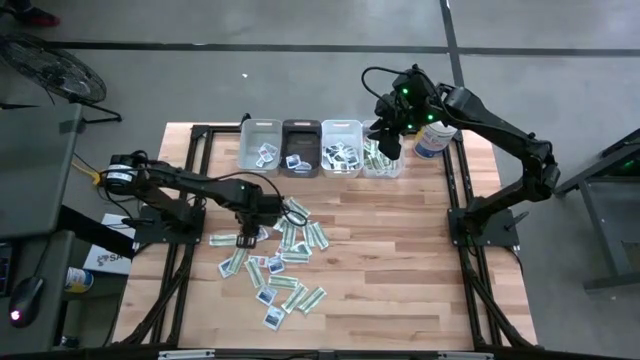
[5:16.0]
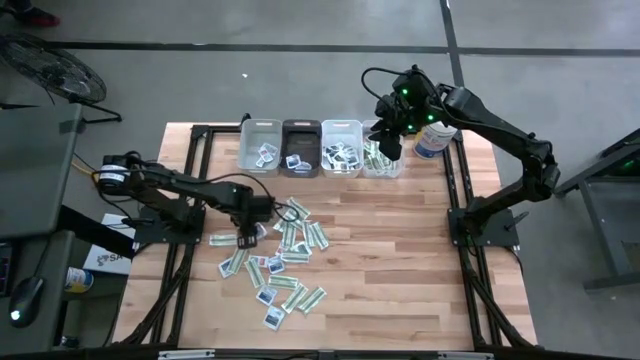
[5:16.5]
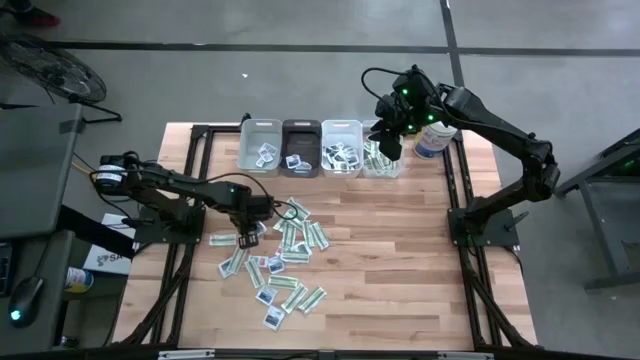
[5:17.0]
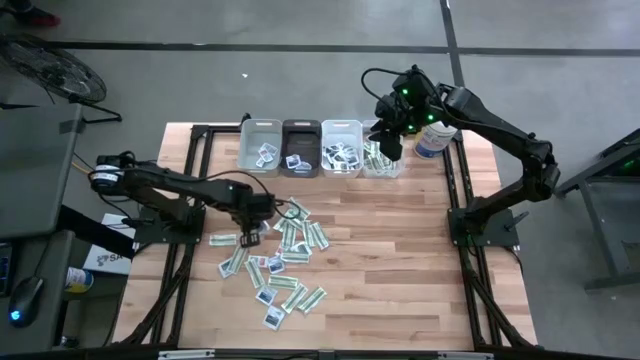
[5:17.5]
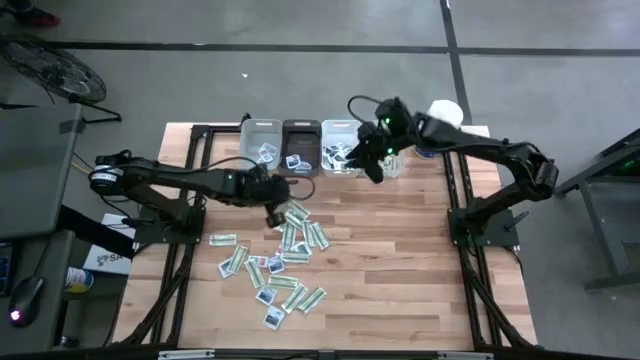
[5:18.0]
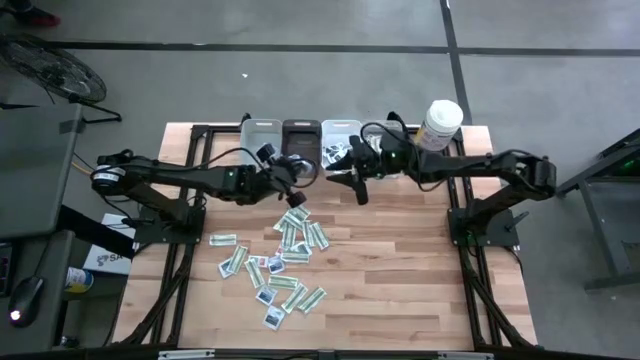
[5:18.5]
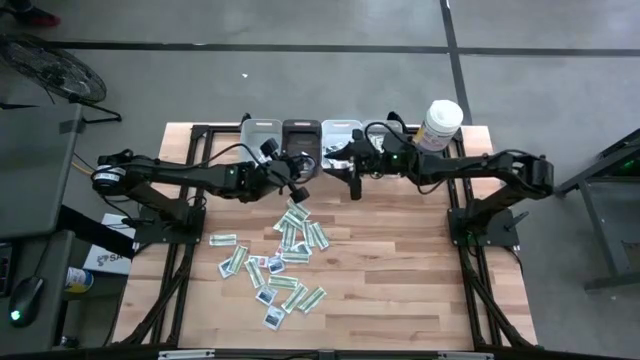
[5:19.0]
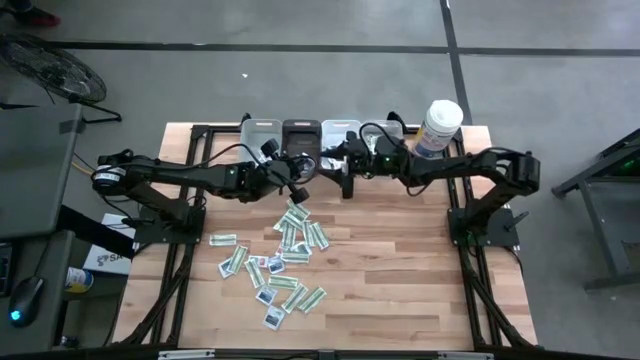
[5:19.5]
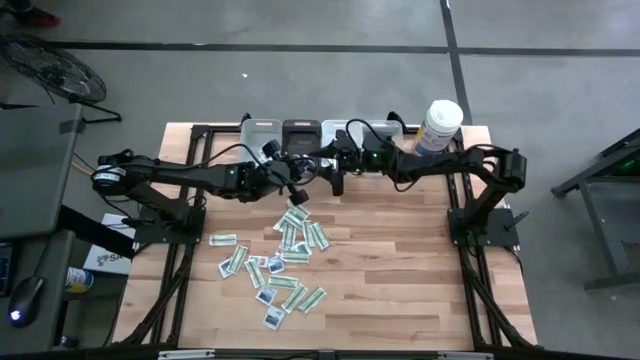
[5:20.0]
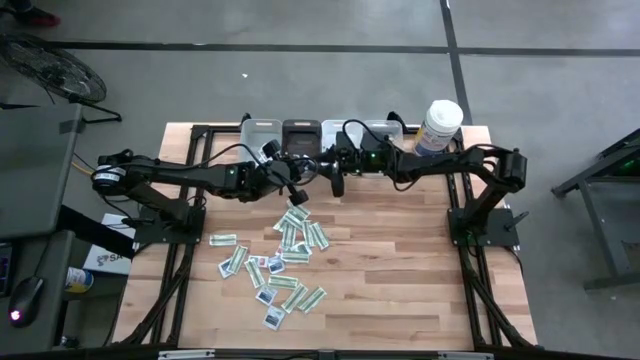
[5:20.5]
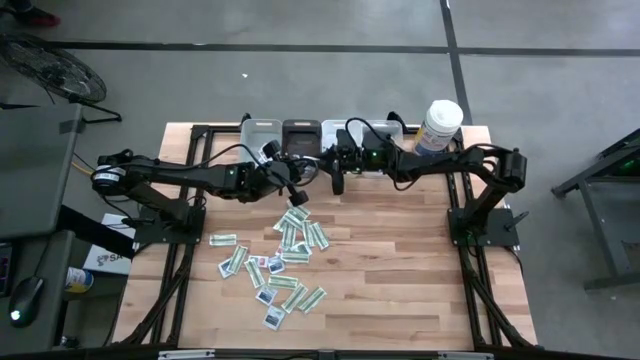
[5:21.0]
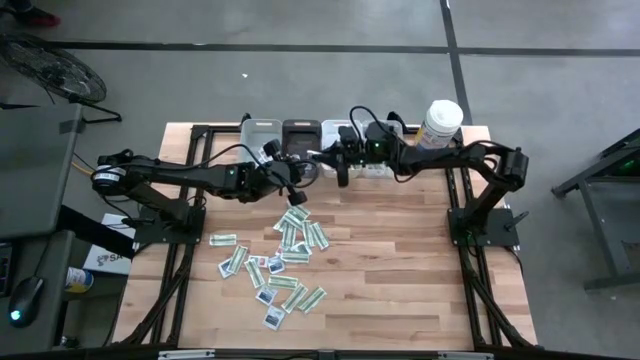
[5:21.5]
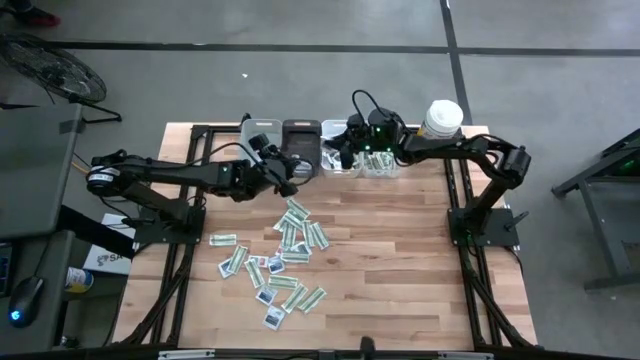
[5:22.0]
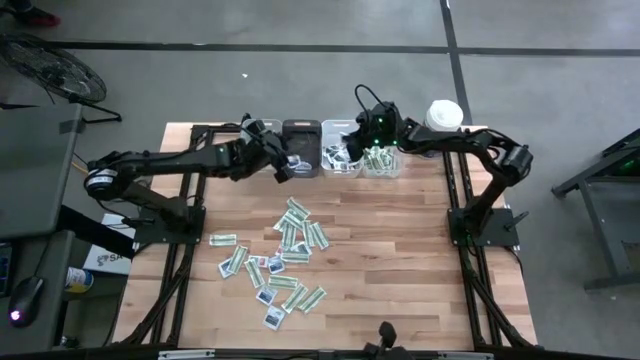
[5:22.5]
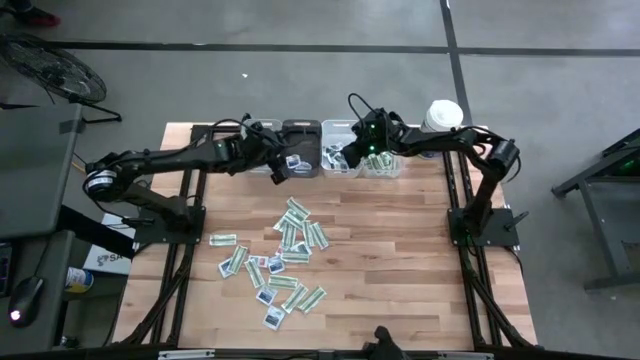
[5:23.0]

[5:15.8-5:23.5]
Task: Pick & Place First Aid Supplies
Put the black towelette pack into the white bin

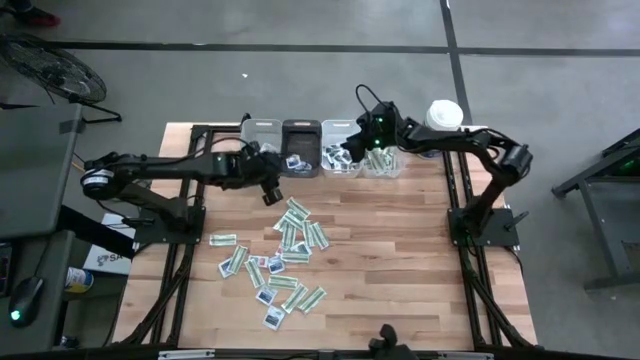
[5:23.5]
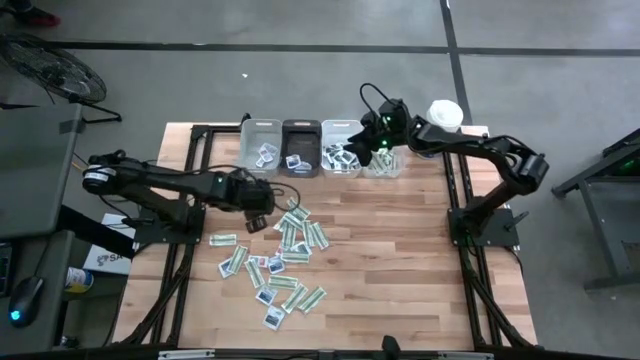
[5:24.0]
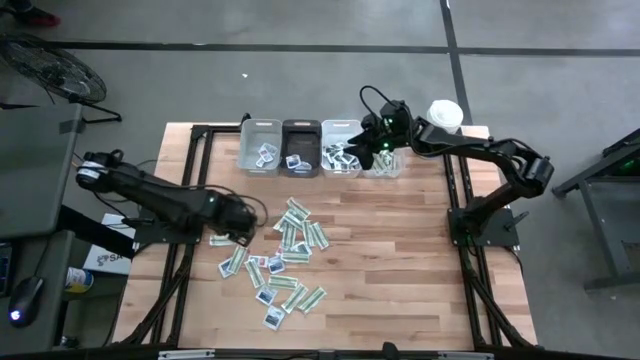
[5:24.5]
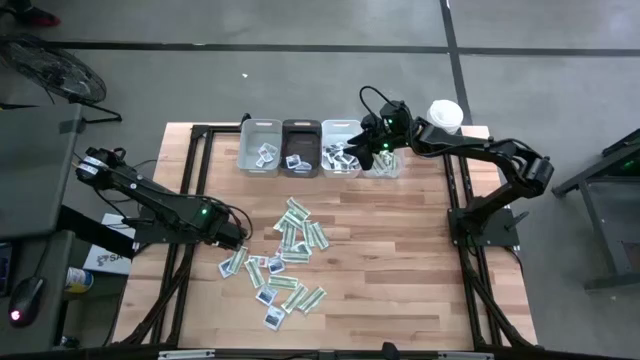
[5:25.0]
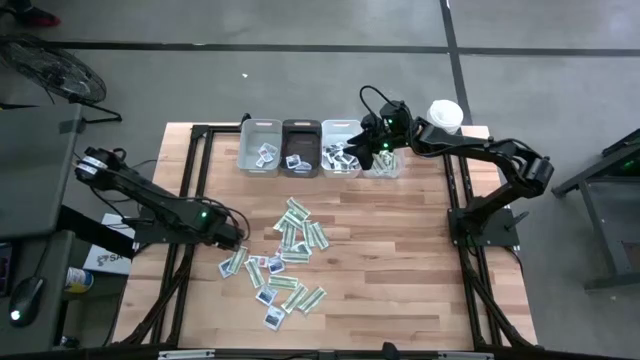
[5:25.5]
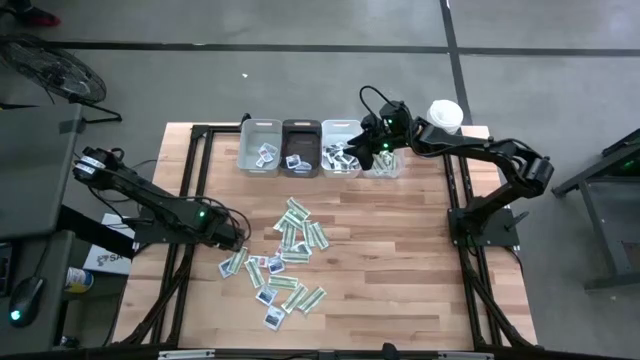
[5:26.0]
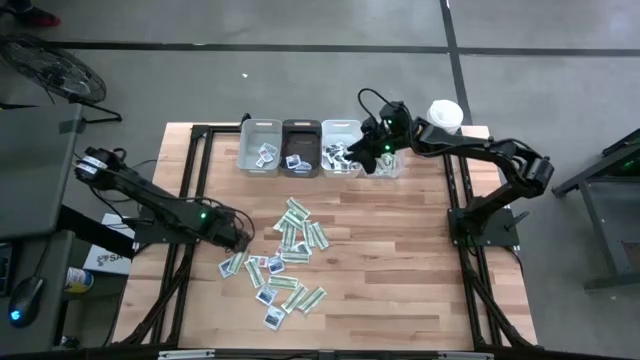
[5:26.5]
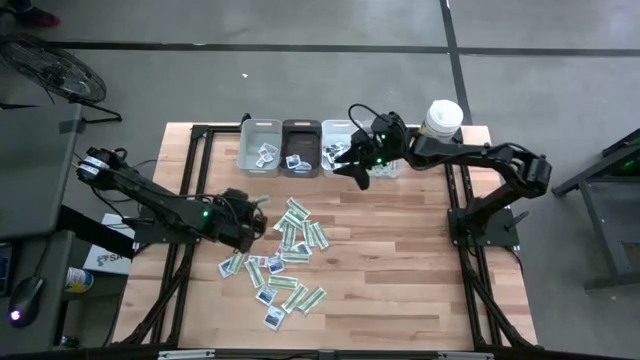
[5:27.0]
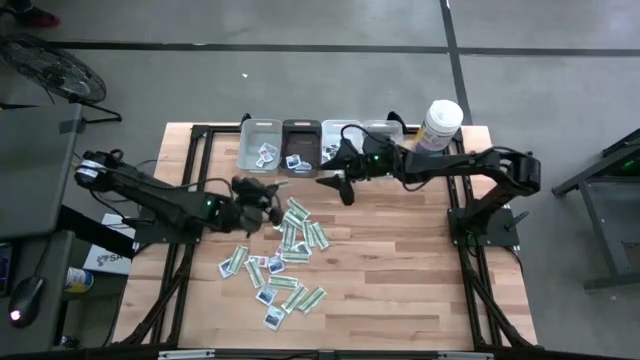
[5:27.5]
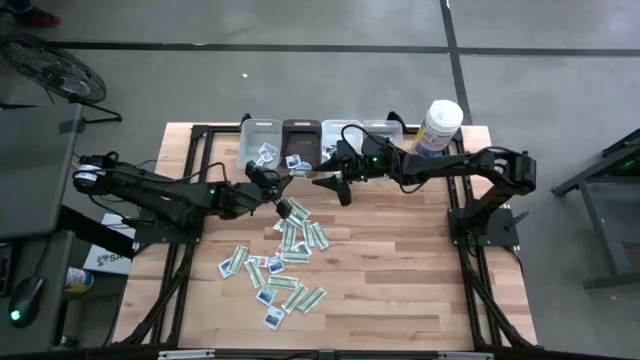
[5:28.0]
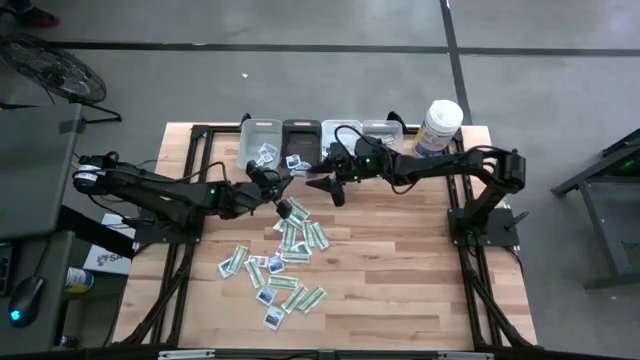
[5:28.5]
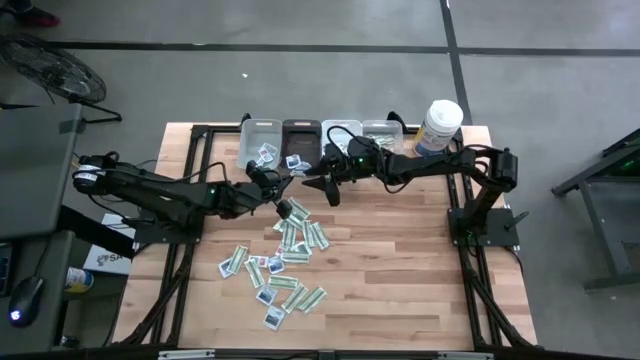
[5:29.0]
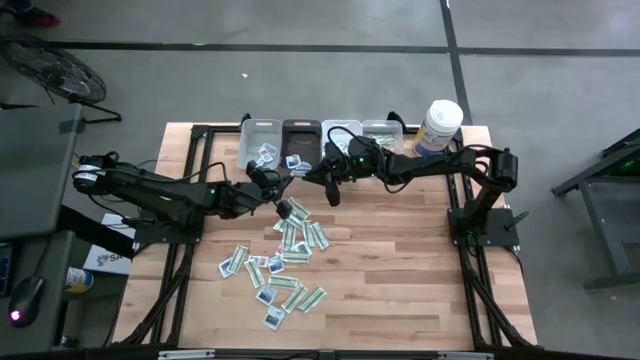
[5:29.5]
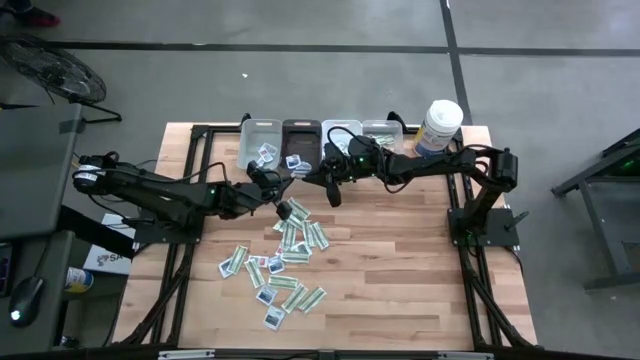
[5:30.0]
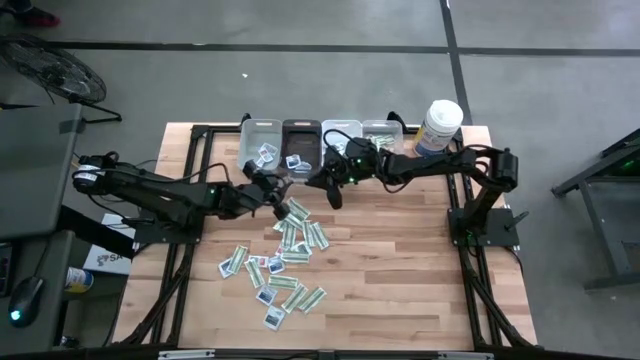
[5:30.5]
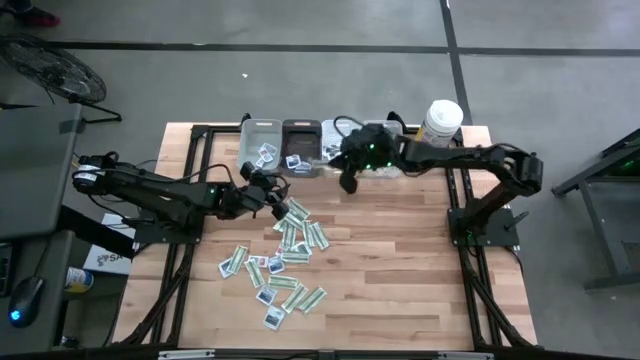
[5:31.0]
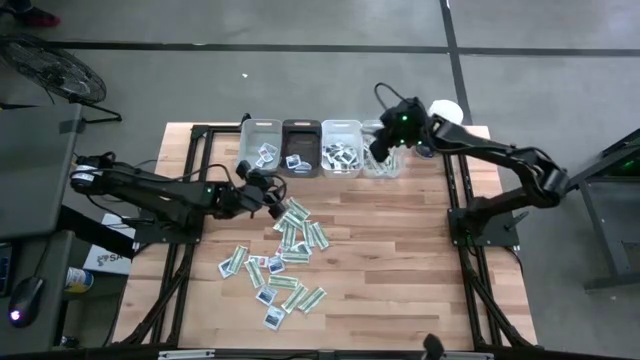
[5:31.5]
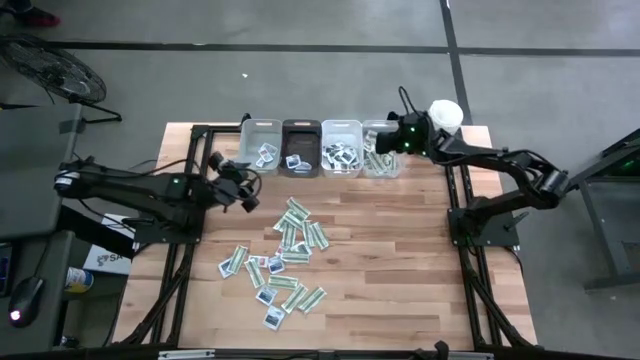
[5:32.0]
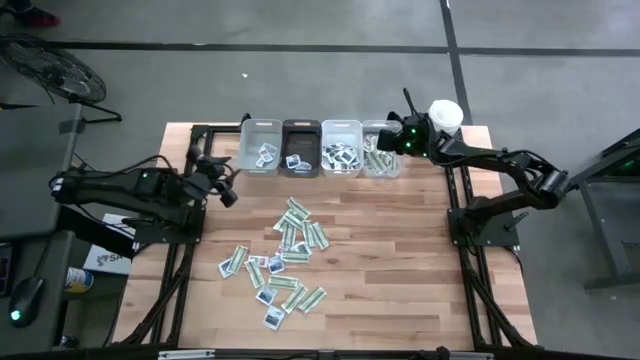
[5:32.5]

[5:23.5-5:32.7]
Put the green bandage into the transparent bin

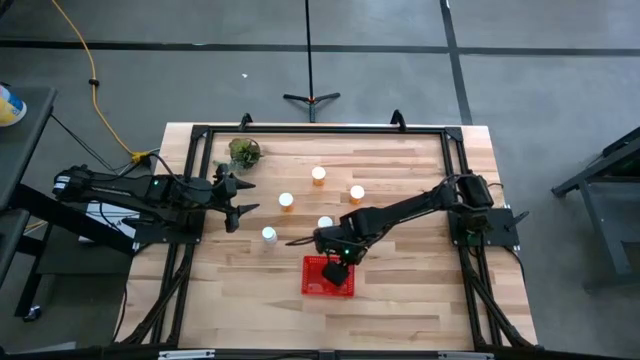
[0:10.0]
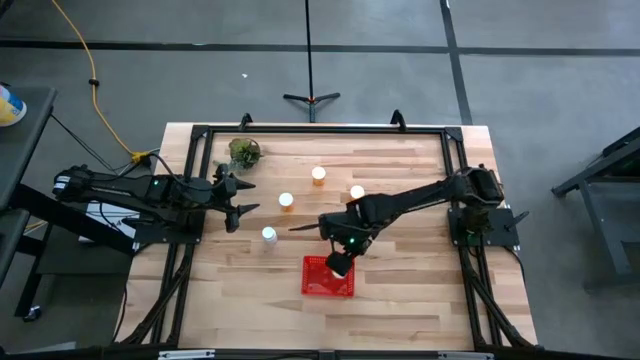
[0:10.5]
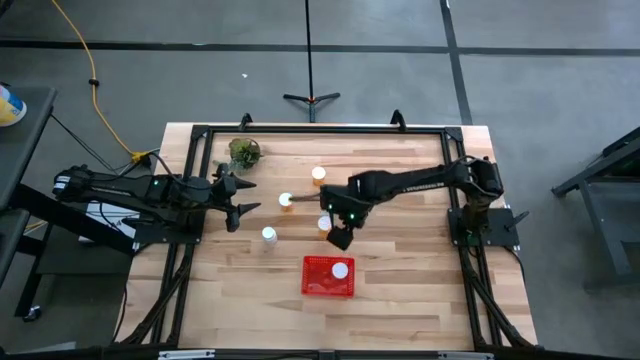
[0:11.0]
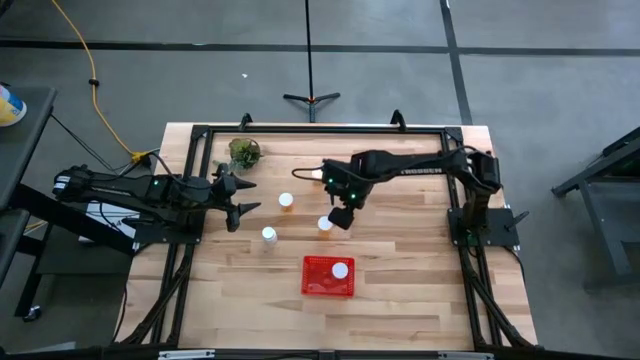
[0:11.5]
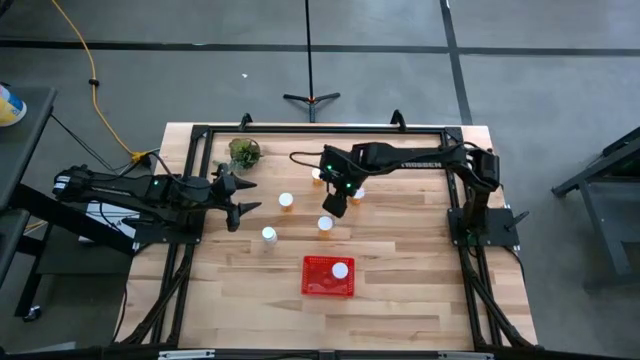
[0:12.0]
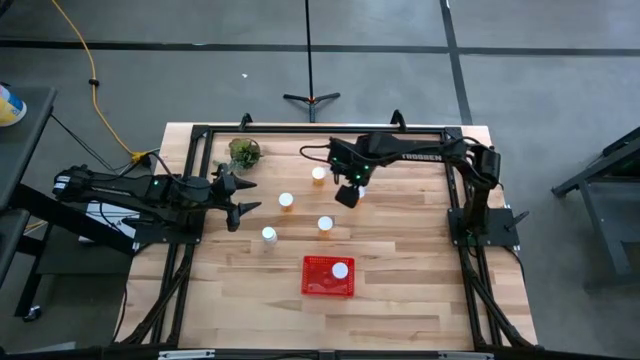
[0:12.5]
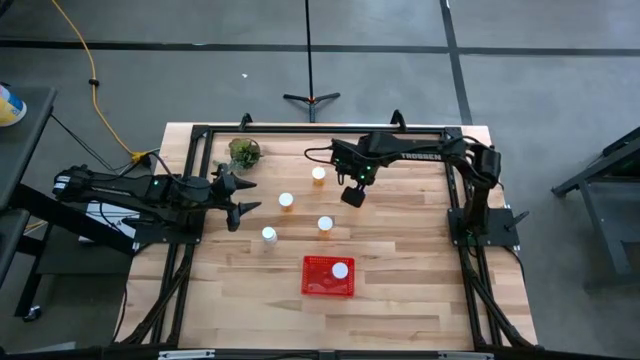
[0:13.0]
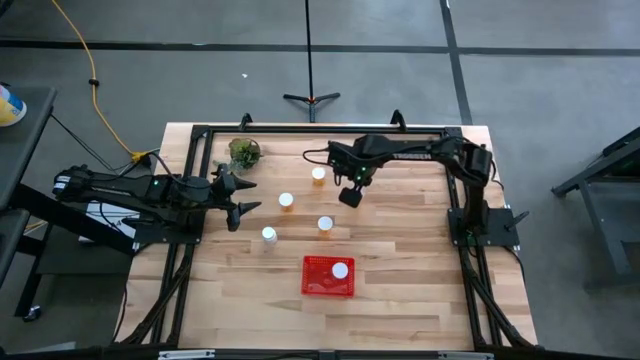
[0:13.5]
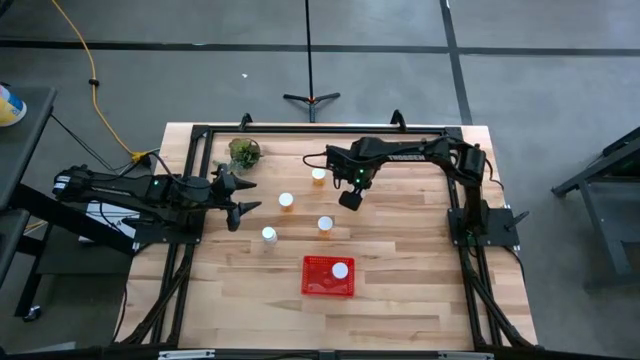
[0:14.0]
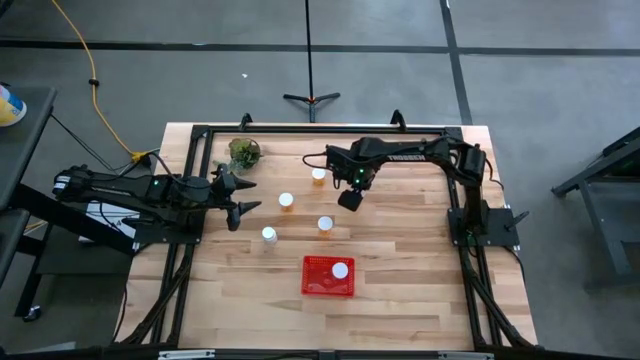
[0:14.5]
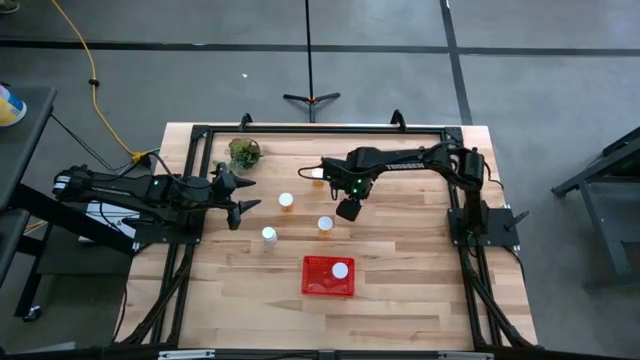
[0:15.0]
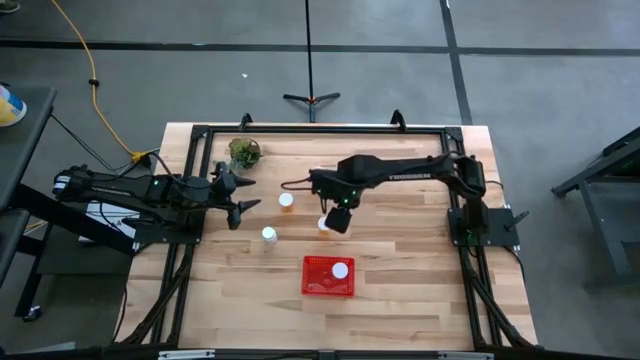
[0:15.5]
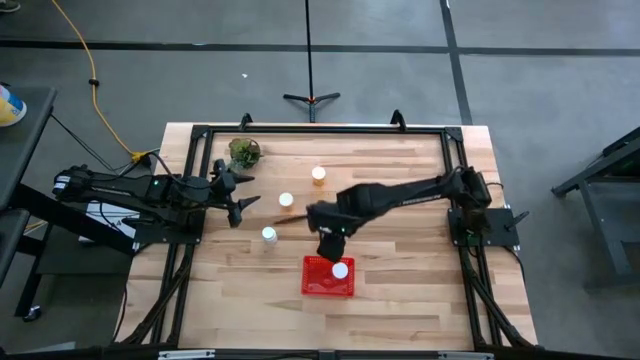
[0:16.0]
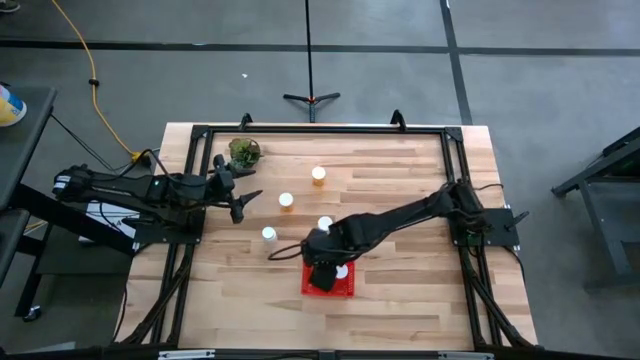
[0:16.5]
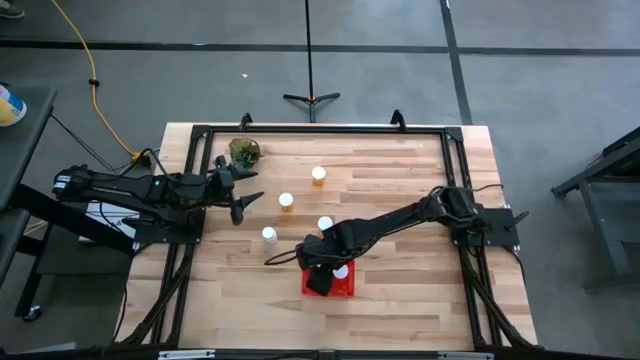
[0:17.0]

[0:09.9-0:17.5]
Task: Pick and place pill bottles into a basket
Put the orange pill bottle into the red bin
